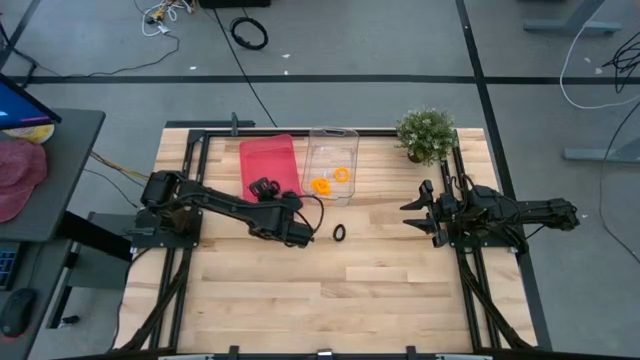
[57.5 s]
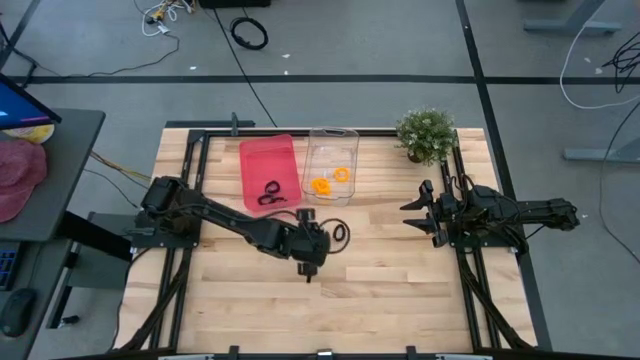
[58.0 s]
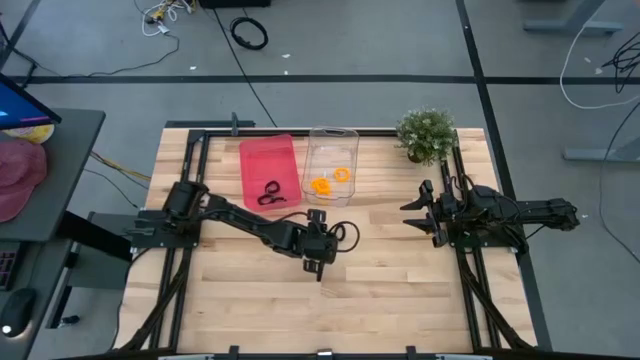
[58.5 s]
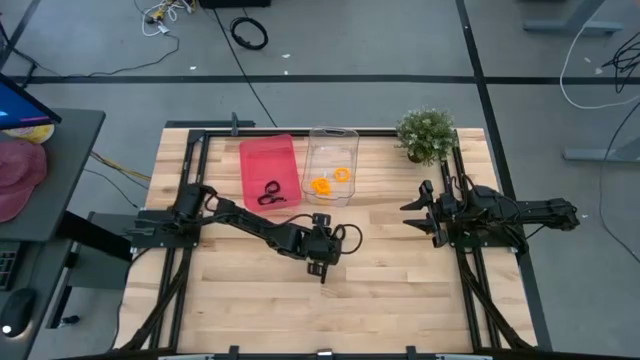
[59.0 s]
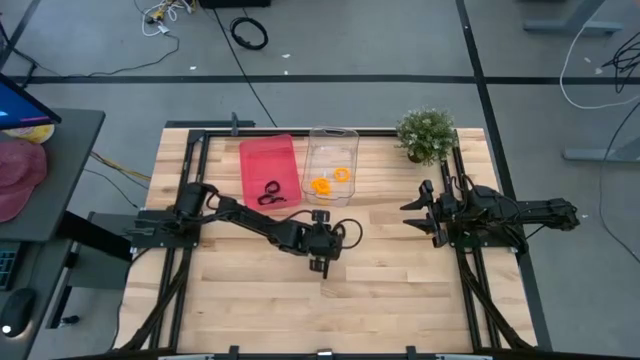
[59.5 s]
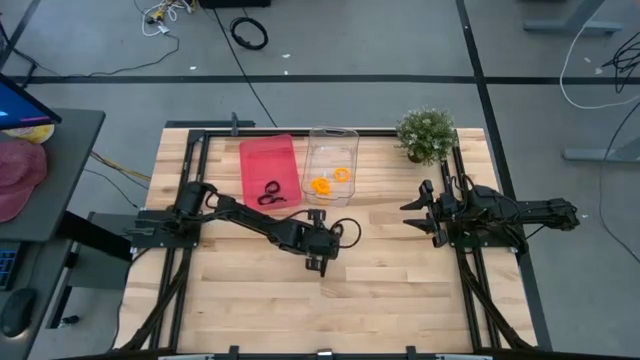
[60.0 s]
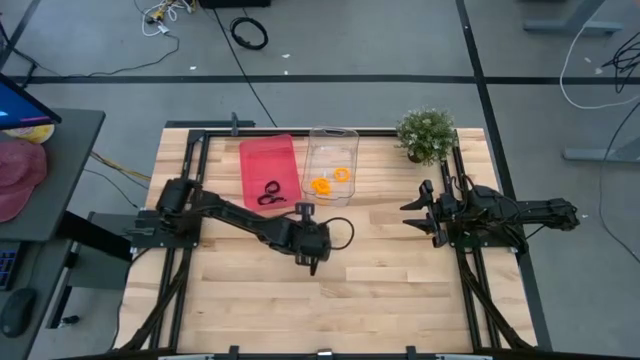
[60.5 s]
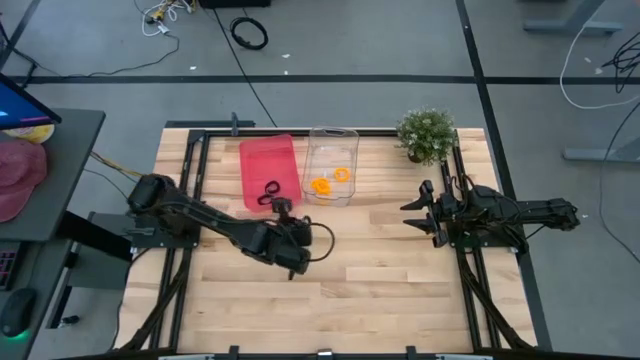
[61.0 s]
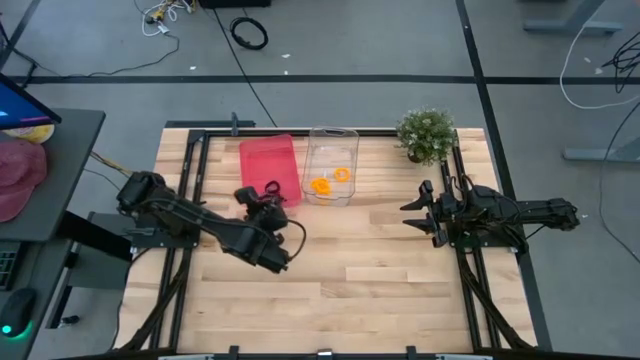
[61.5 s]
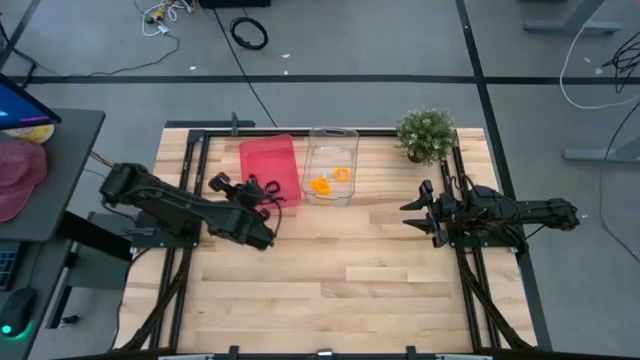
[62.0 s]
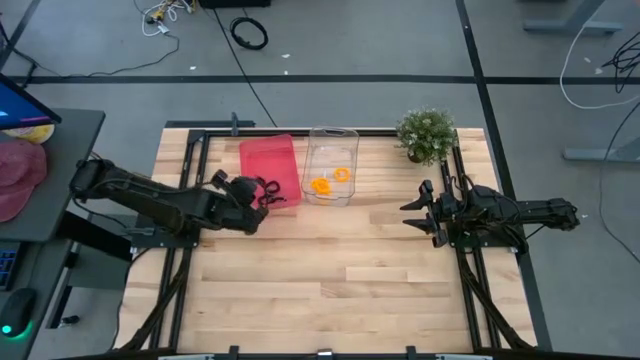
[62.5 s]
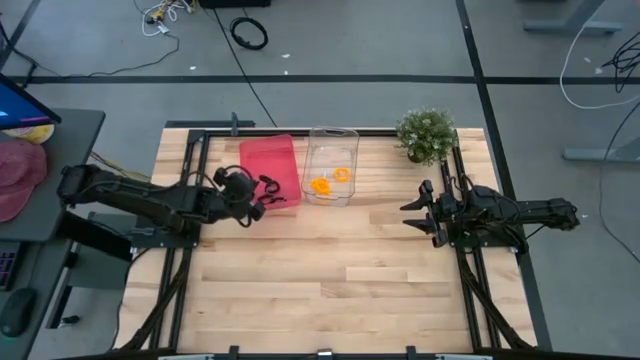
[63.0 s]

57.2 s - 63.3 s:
Task: Sort spring keychains
Put the black spring keychain into the red bin

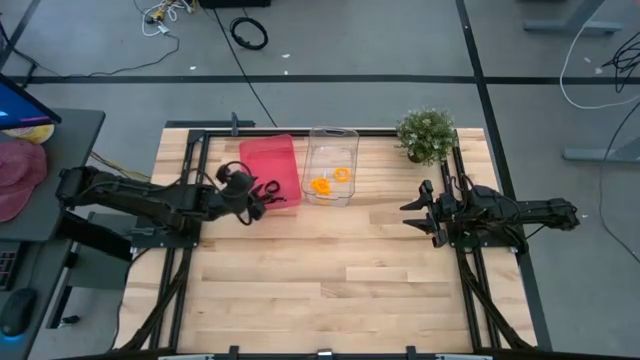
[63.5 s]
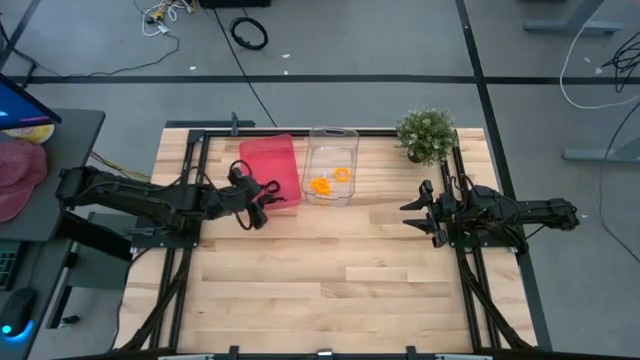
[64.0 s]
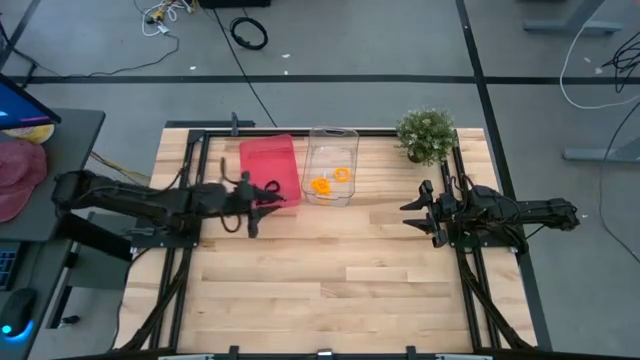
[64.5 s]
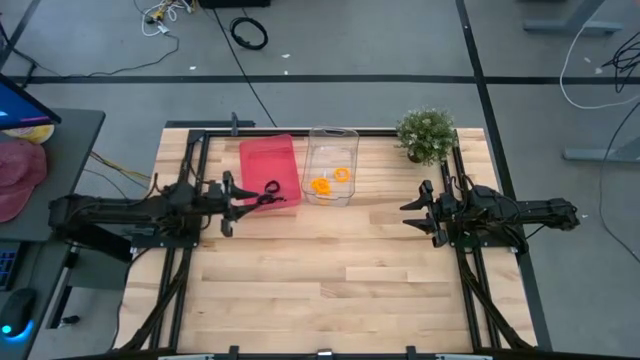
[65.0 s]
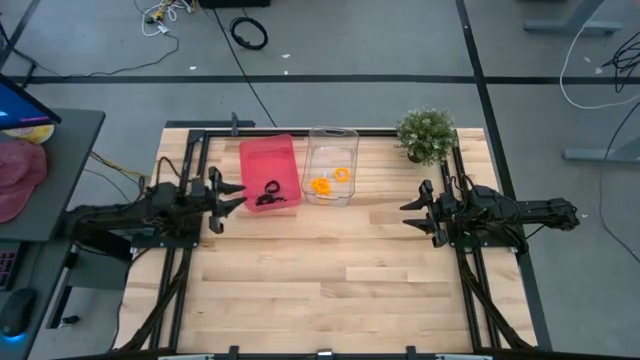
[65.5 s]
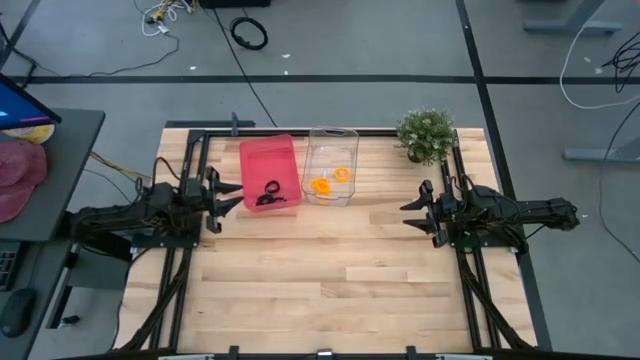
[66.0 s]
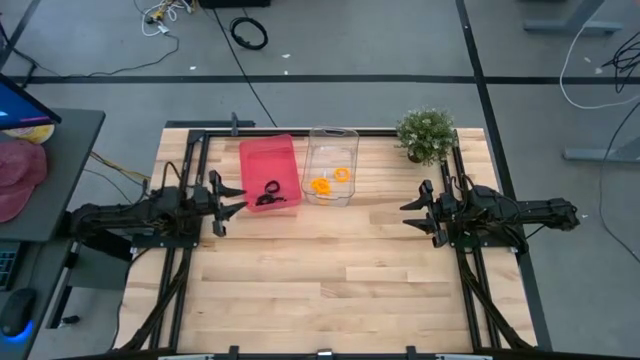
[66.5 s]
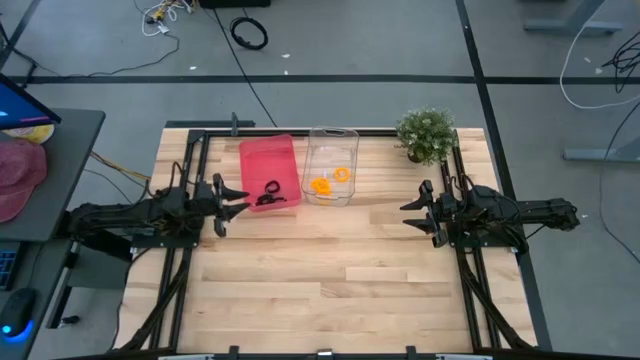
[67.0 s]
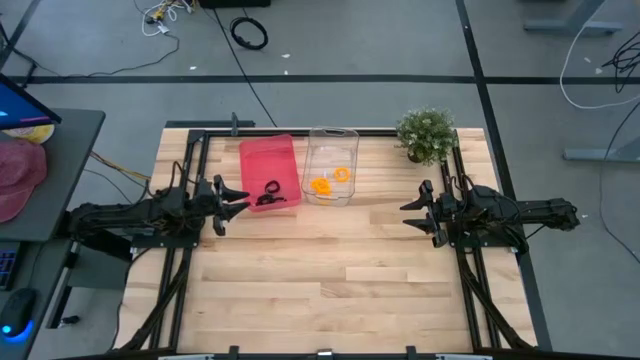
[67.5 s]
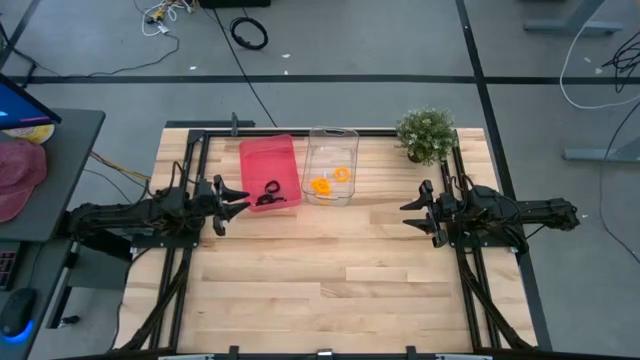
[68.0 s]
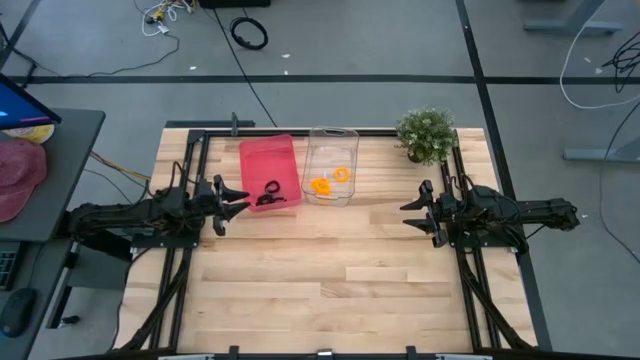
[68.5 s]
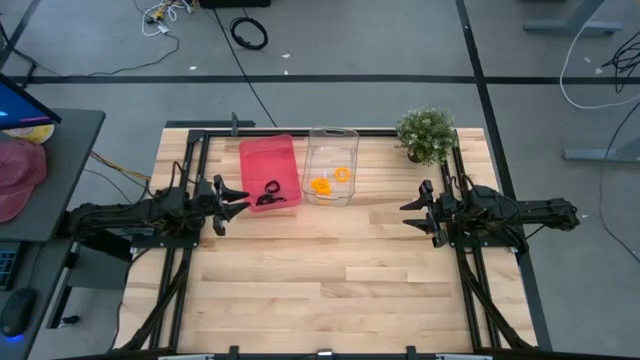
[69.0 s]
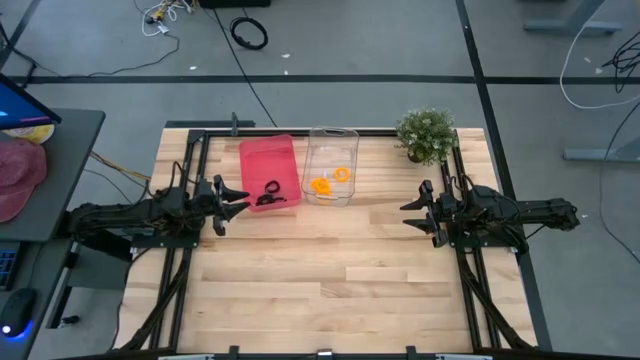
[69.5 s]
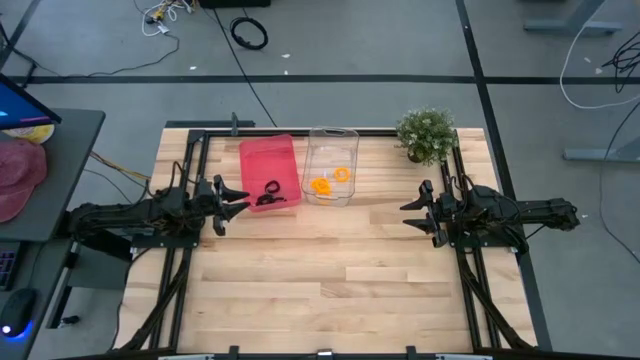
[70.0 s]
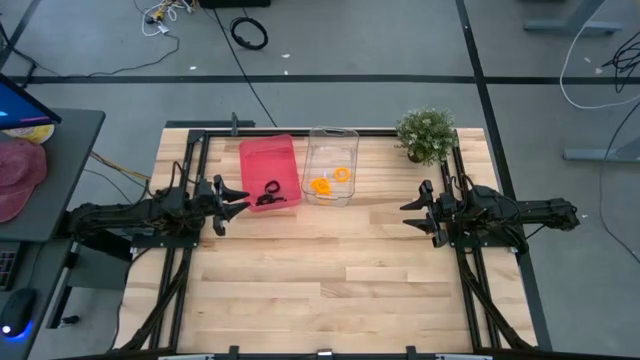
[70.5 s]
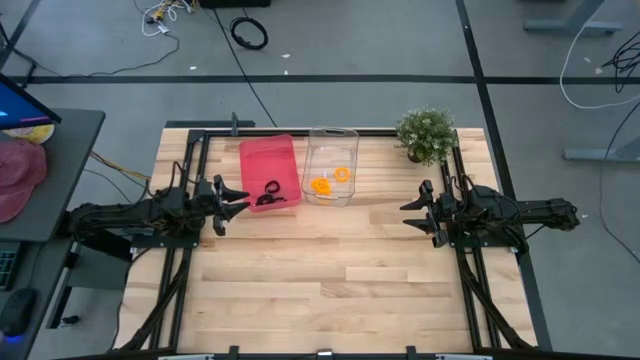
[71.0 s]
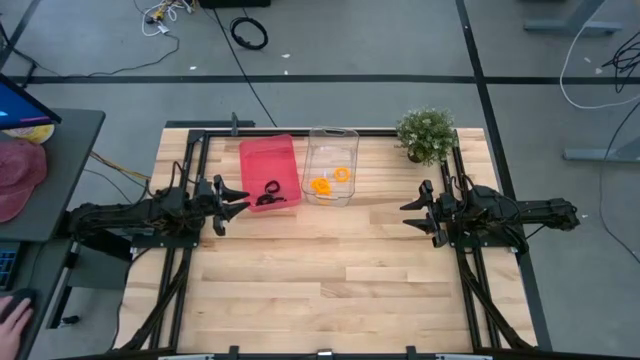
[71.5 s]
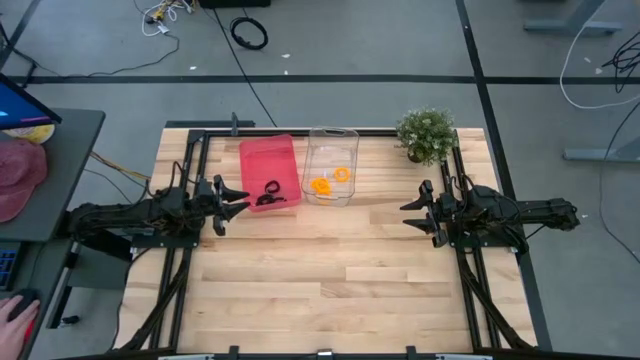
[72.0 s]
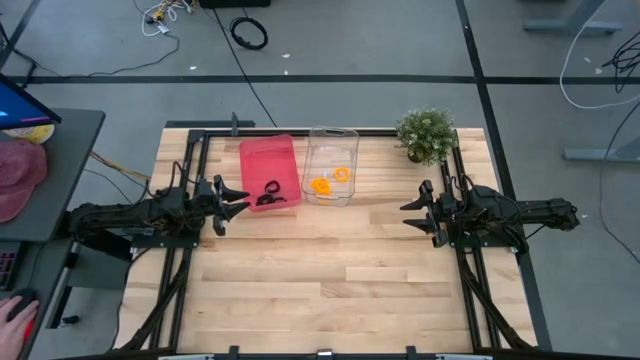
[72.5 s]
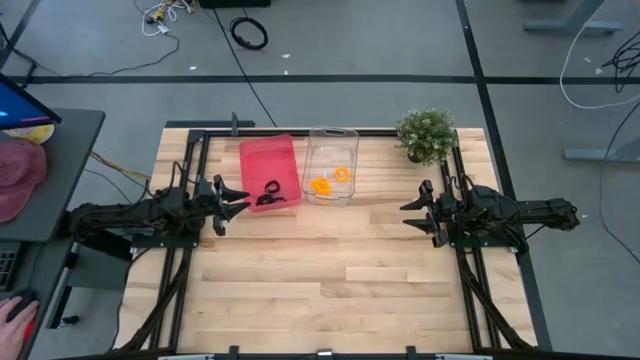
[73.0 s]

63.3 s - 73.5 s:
Return to Home Position

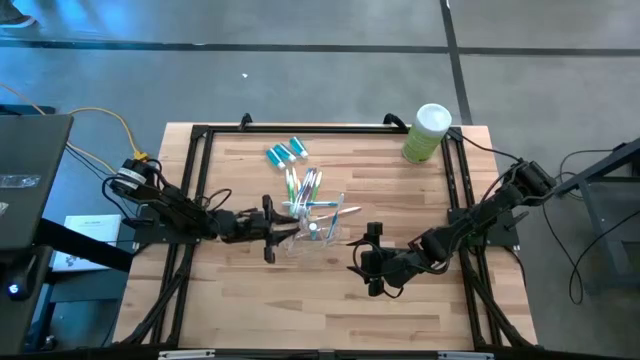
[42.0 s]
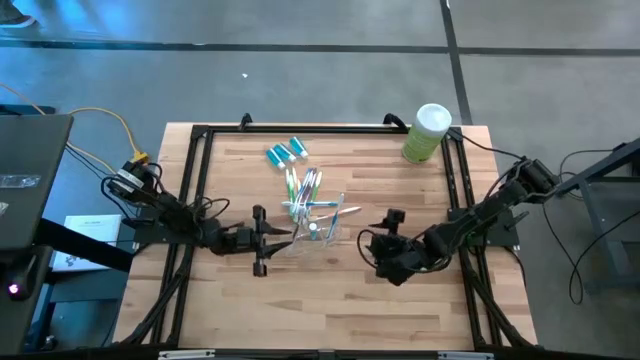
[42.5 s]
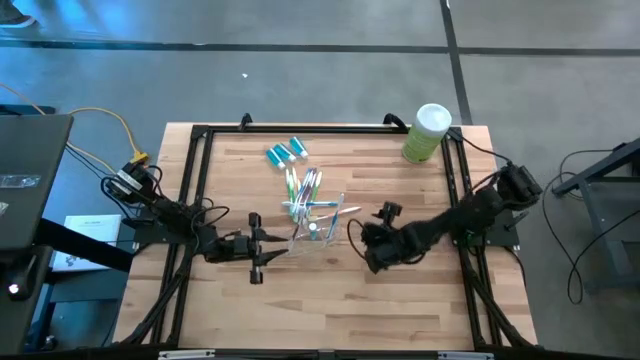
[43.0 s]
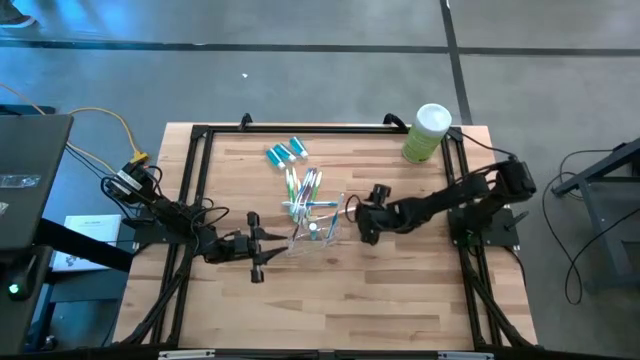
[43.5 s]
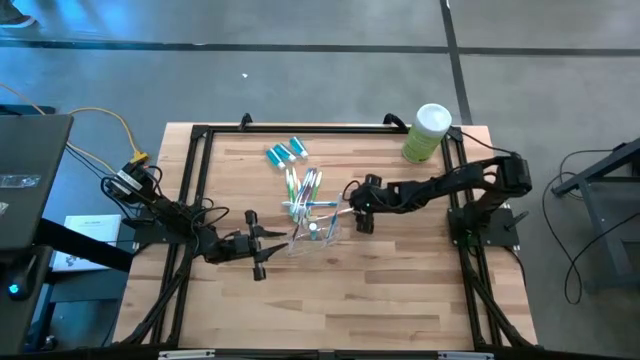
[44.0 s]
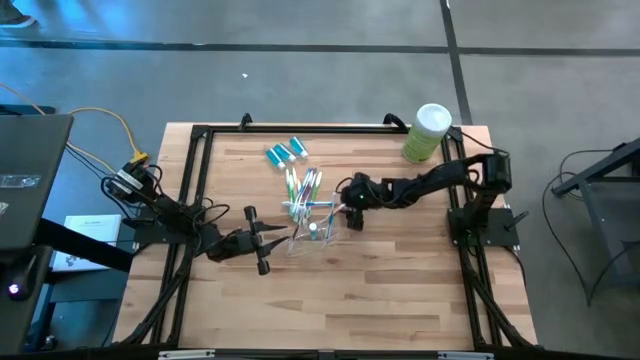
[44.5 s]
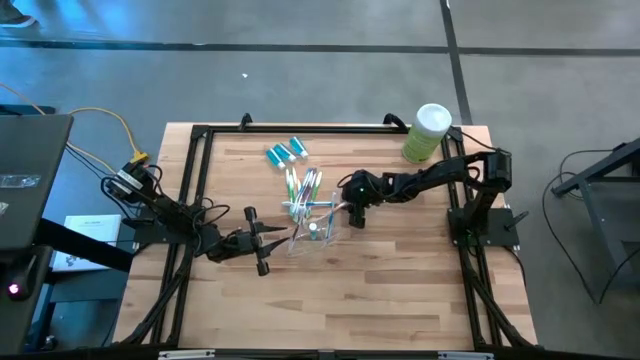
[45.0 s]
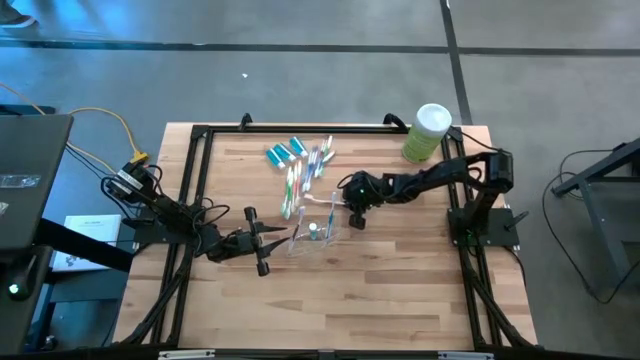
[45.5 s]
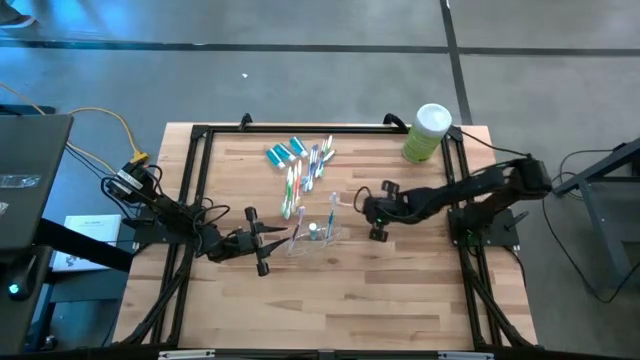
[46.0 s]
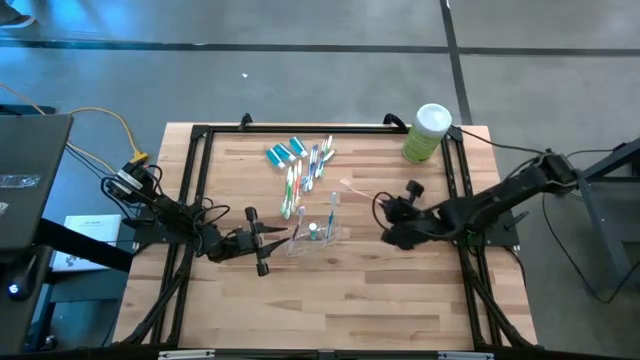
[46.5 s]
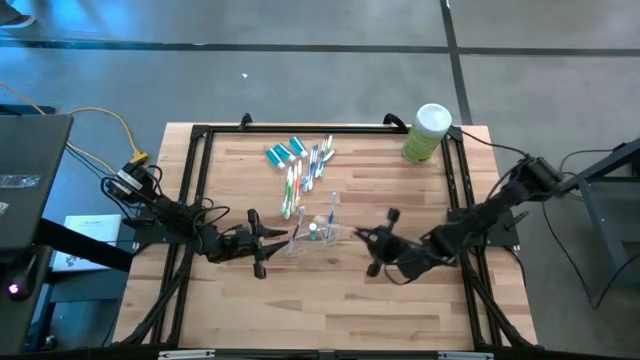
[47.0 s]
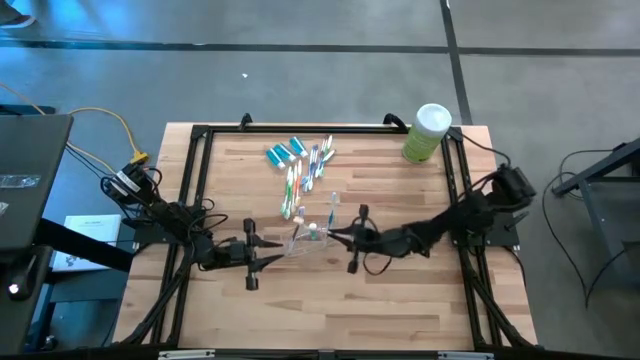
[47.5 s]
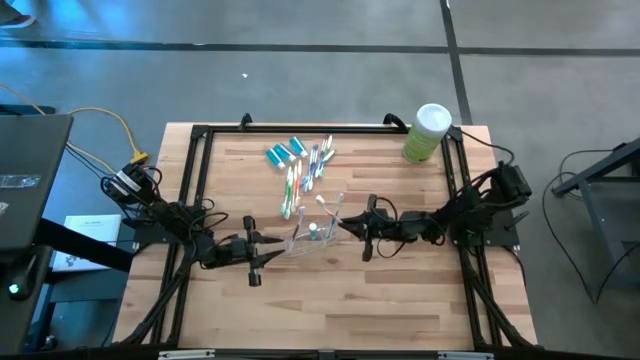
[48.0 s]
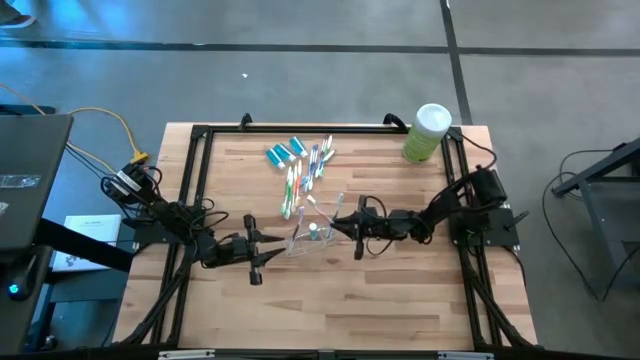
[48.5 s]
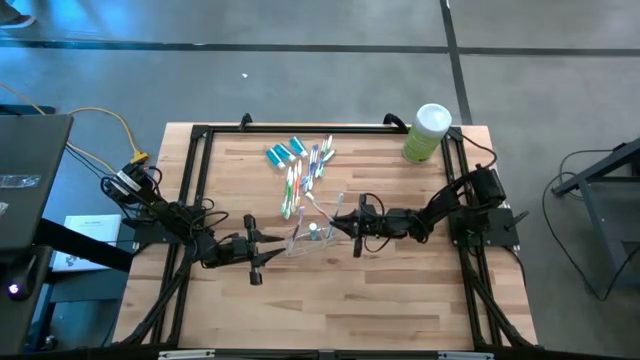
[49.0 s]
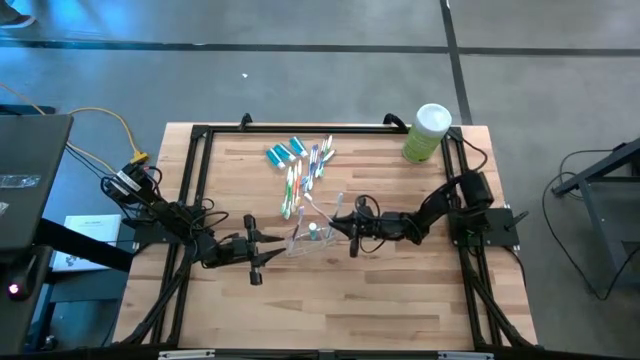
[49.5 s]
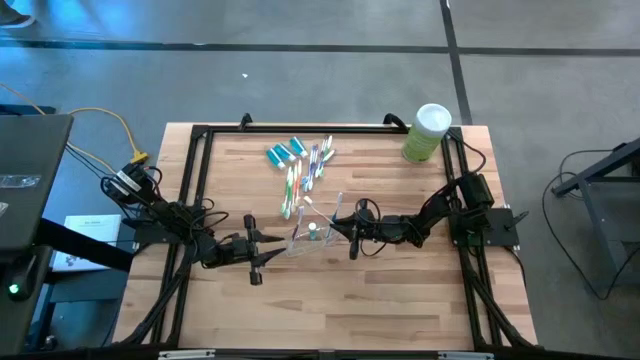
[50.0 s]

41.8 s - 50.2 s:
Task: Pick & Place toothbrushing station
Put the orange toothbrush into the transparent organizer
